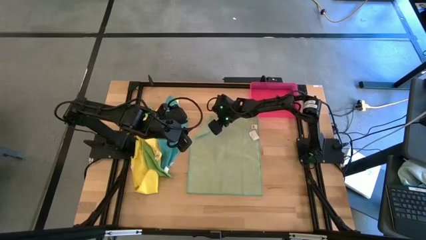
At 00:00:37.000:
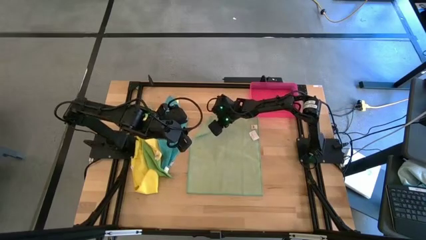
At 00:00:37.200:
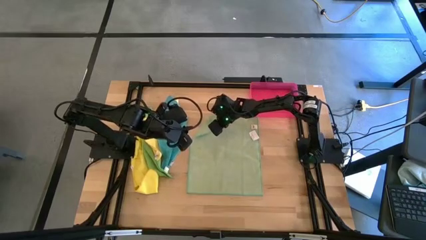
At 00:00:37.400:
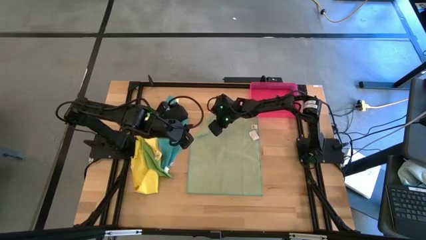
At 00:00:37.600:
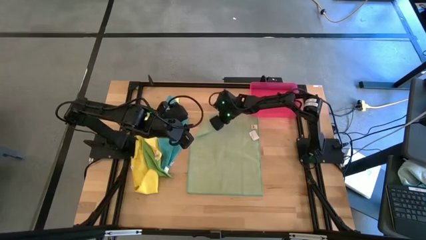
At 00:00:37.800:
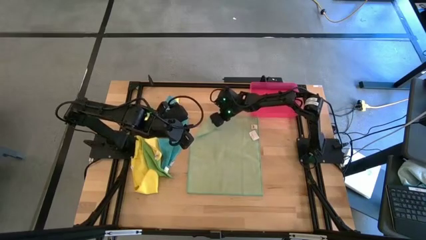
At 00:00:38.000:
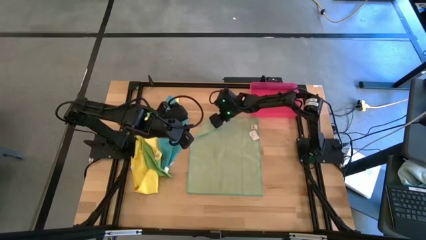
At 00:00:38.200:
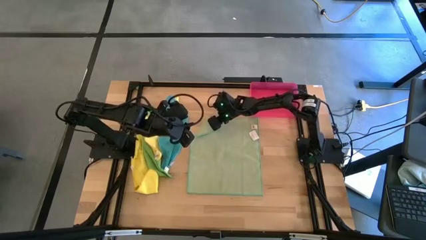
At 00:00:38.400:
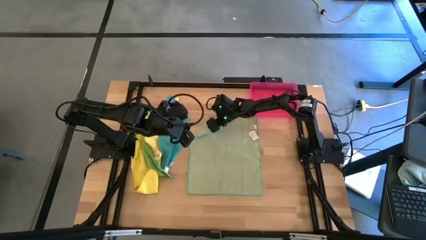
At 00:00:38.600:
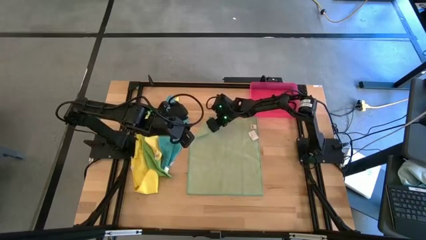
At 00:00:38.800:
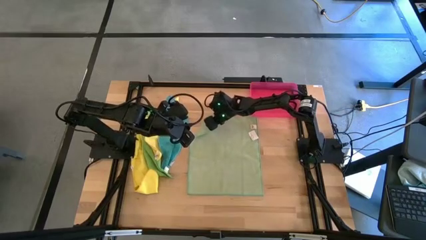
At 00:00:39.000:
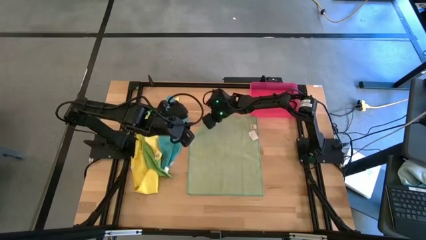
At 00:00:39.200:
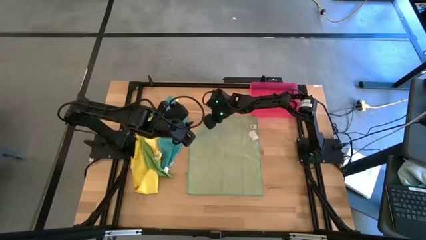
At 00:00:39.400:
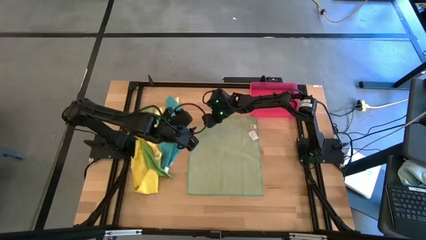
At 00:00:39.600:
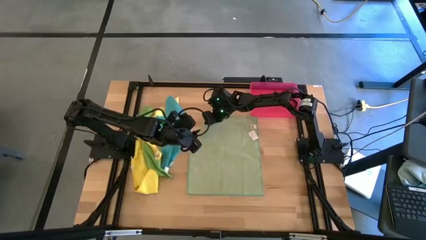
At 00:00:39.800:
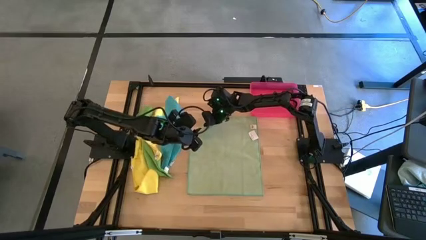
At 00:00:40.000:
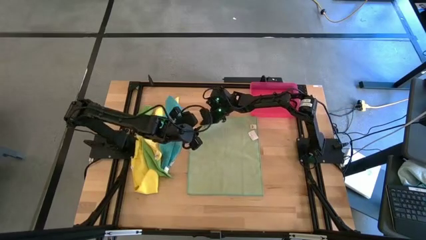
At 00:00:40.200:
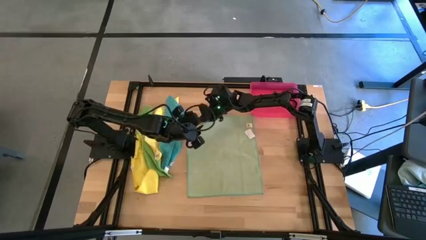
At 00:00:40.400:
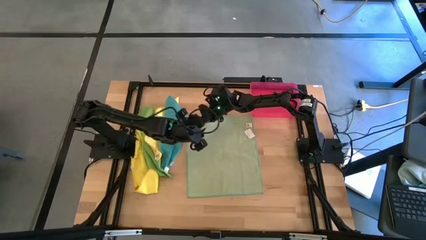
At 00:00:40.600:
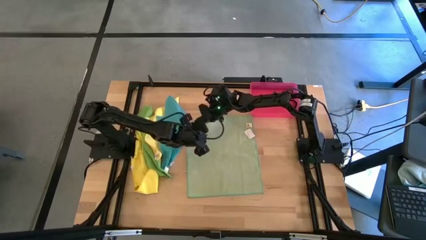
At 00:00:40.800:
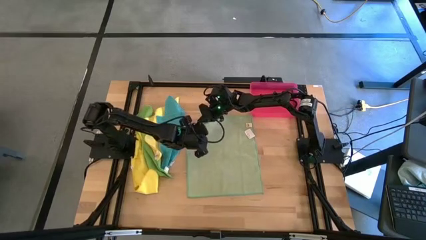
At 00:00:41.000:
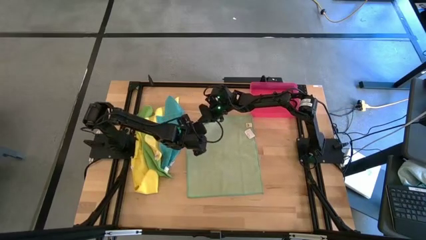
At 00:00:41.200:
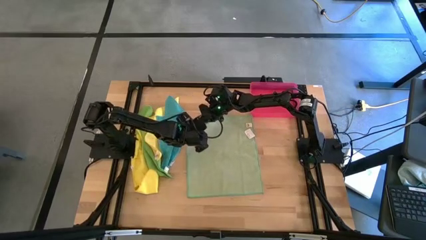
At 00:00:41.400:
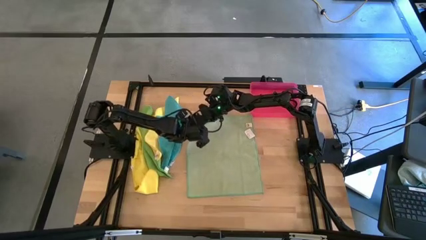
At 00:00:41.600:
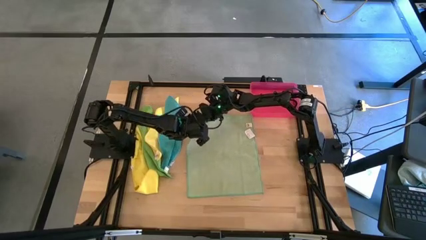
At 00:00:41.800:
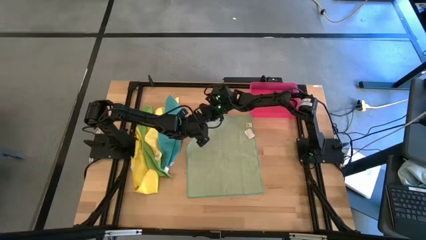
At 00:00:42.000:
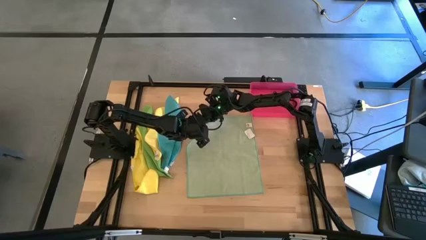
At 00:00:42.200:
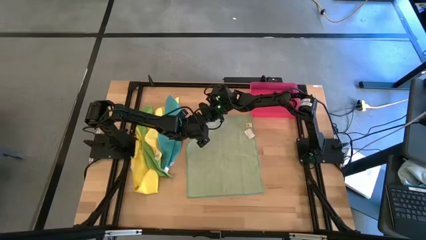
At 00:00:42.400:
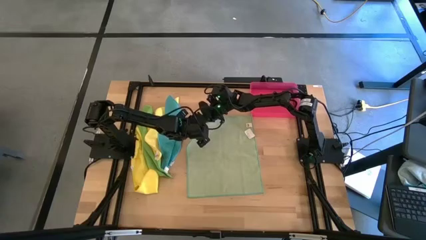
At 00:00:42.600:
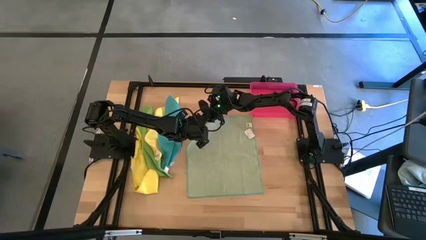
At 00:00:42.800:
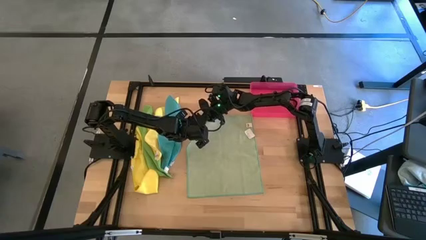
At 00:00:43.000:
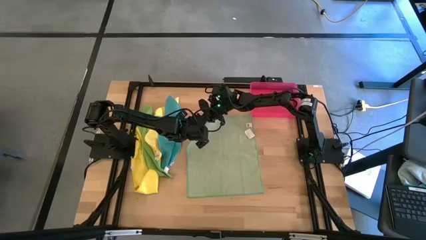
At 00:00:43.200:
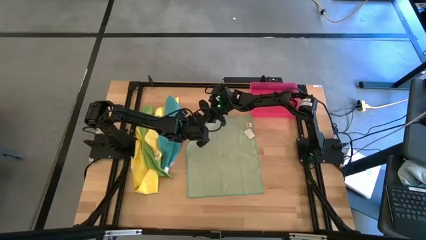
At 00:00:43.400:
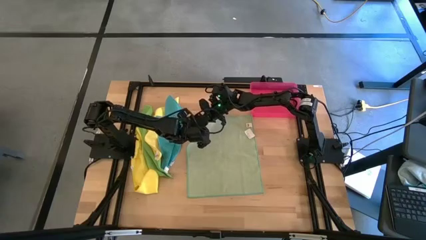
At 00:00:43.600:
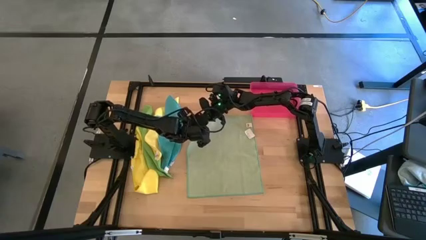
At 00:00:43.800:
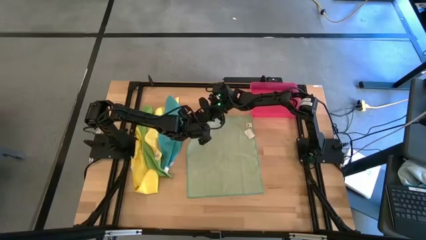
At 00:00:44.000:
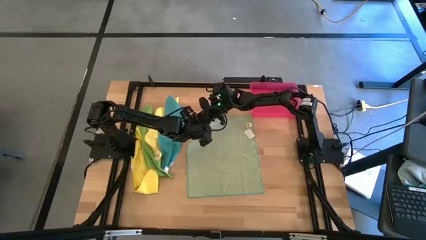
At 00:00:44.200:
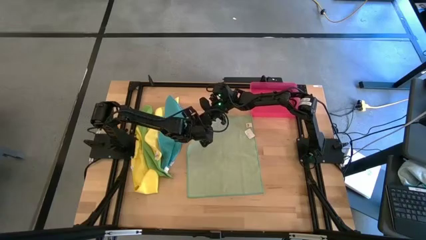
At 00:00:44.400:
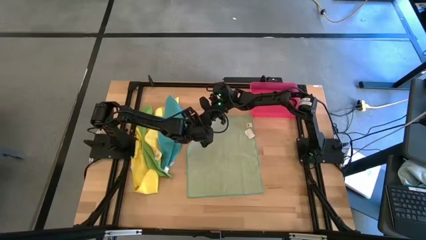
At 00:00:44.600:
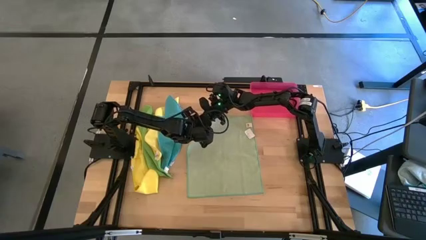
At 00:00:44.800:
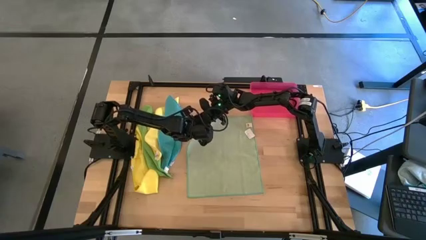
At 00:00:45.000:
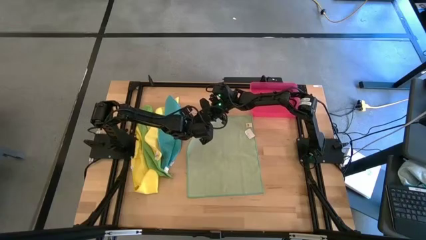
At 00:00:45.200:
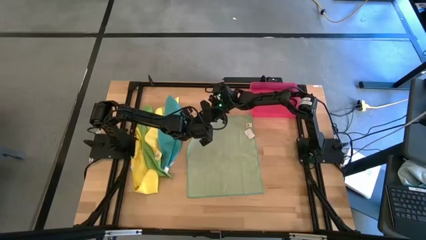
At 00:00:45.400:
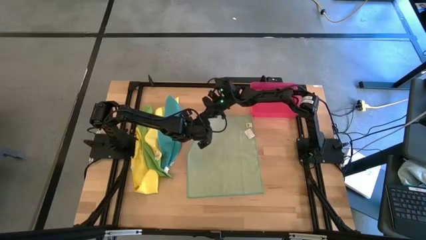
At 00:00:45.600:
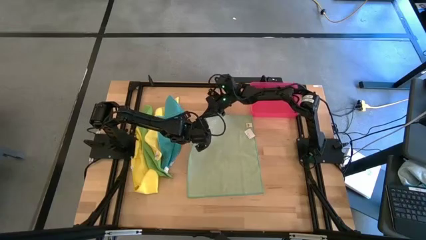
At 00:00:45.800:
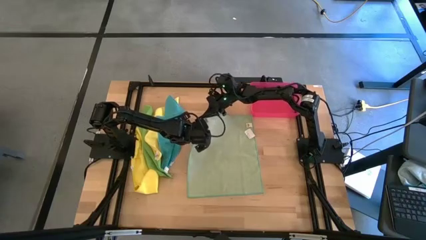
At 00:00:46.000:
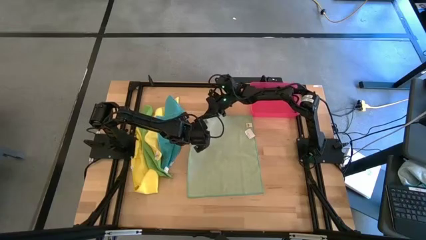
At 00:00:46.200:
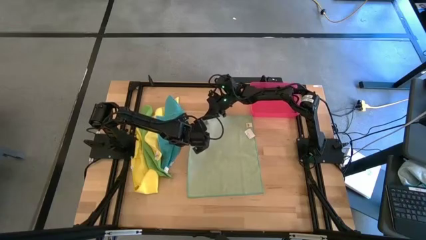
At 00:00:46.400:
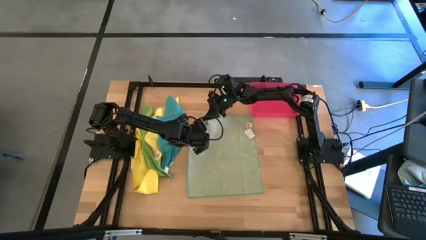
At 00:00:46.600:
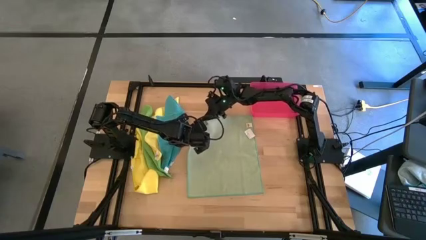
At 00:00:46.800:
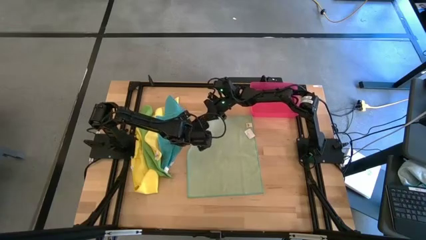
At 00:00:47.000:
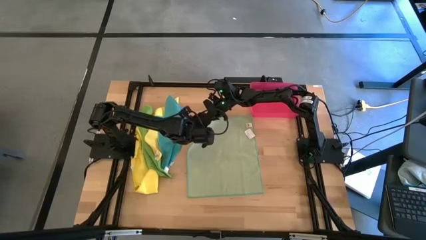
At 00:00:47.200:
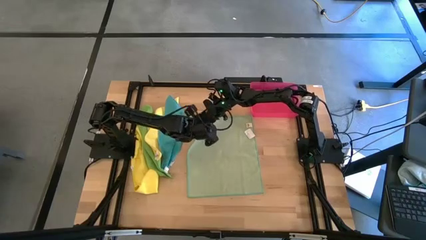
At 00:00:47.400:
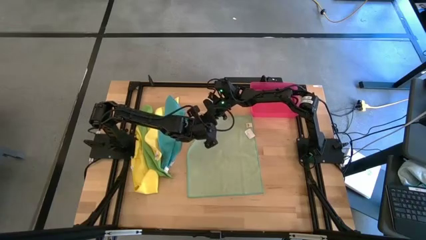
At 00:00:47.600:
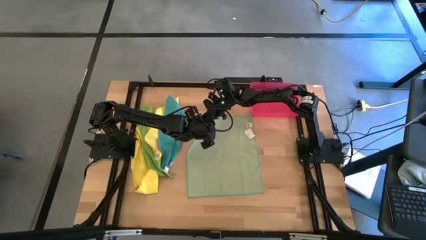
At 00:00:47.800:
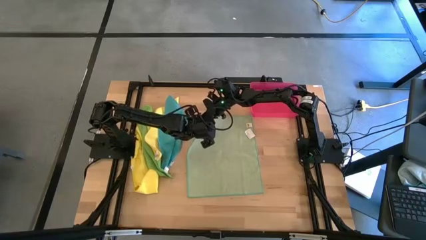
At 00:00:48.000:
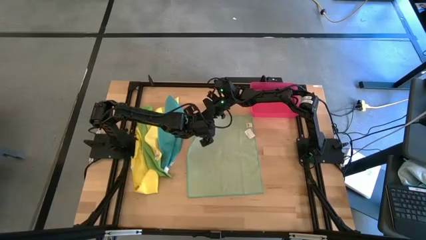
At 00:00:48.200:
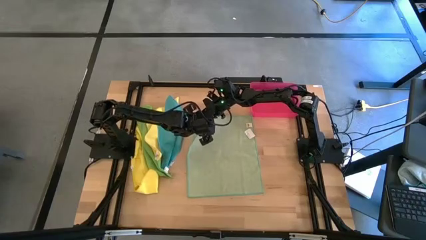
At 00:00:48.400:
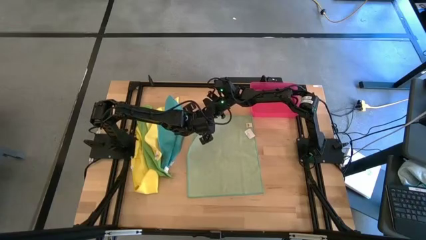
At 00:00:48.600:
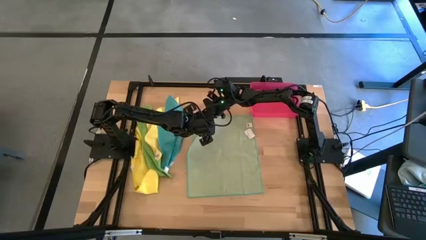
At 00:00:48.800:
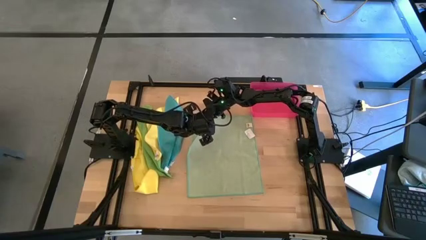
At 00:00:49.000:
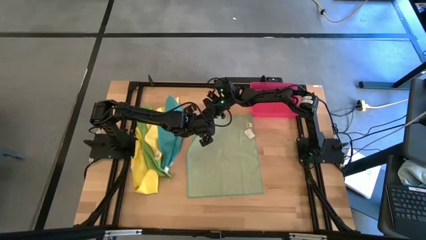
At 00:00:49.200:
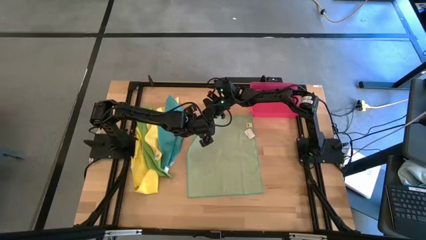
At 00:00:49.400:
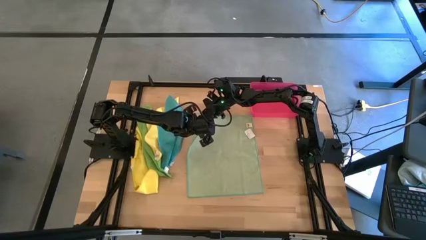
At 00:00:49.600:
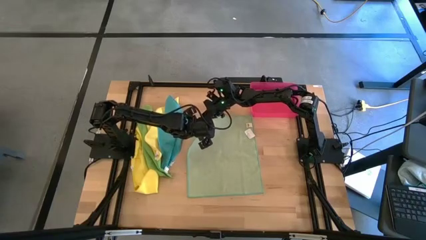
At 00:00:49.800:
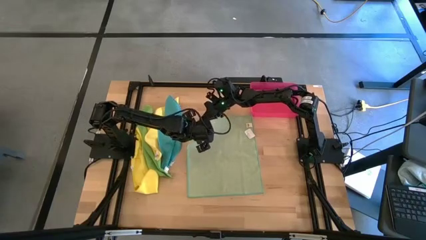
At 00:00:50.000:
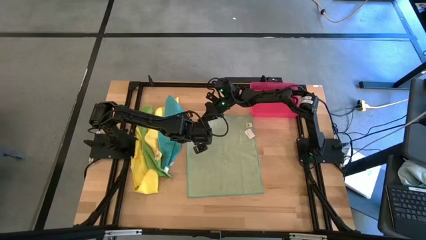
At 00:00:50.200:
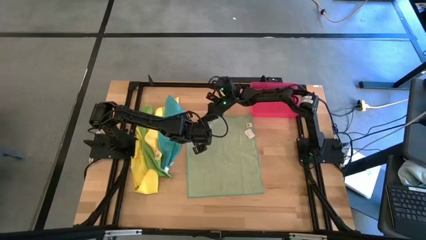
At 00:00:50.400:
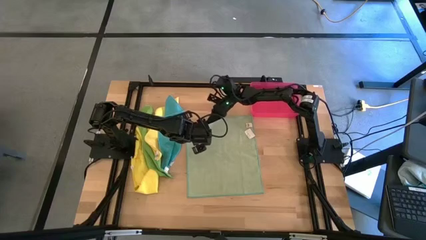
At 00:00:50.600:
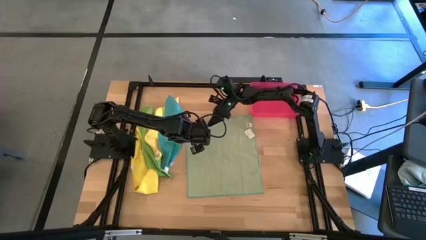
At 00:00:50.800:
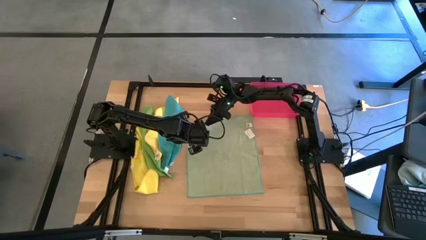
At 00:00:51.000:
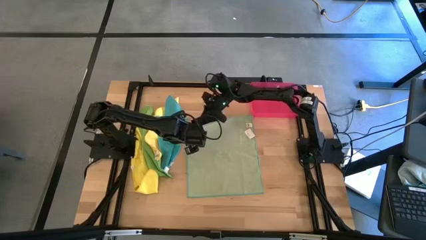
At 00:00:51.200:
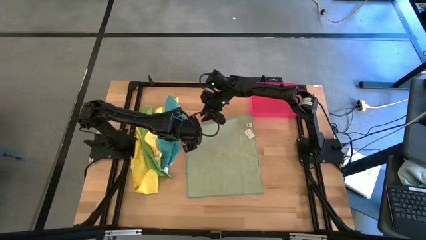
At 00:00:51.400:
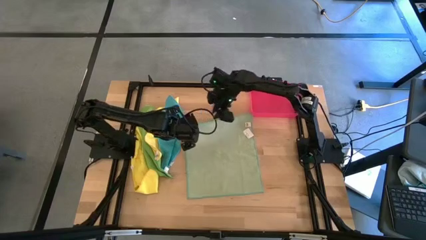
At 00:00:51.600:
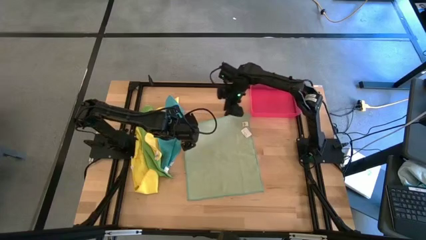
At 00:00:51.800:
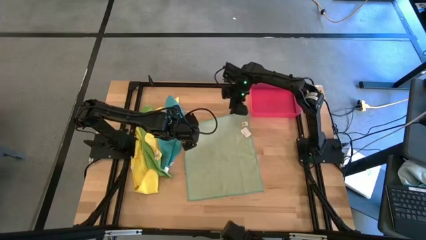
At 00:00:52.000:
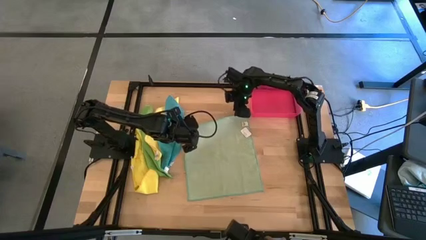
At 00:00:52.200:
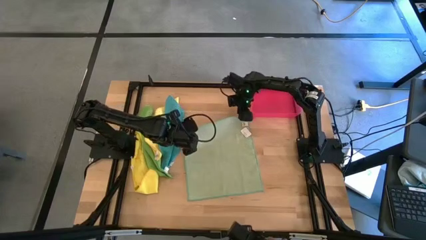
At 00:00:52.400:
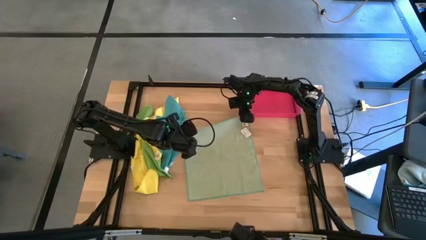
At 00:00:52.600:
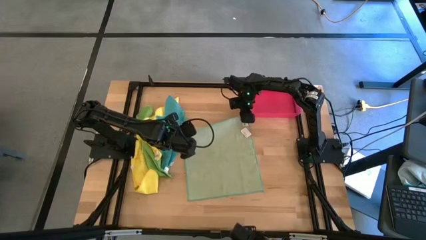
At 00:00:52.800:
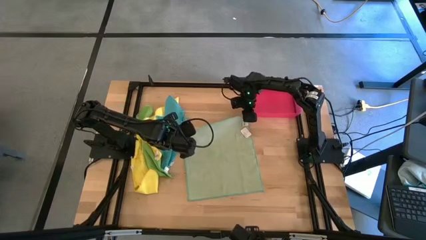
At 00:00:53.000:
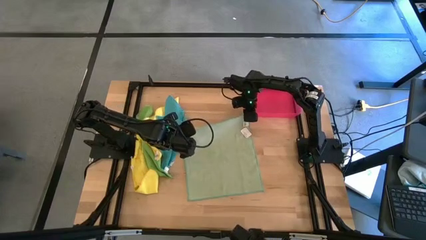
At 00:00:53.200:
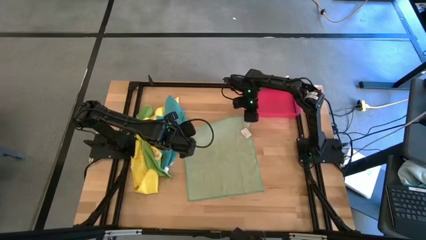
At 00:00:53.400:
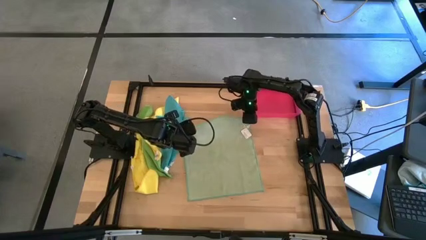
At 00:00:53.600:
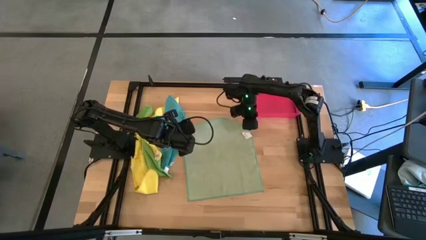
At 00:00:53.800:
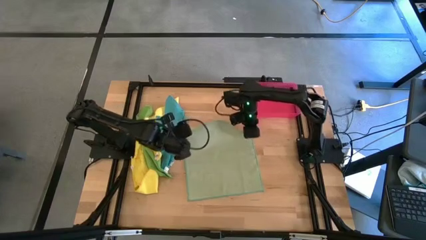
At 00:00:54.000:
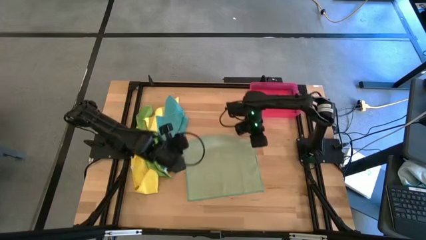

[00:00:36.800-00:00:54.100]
Task: Fold microfiber towels
Fold the light green towel
